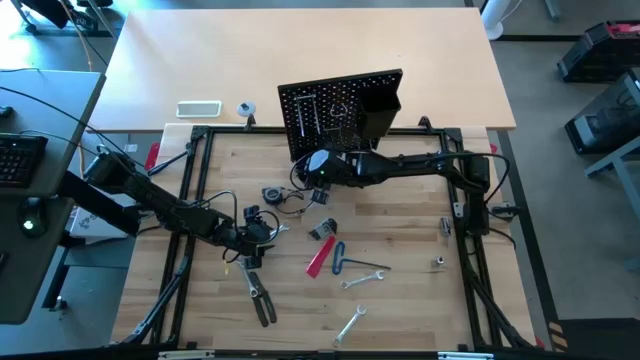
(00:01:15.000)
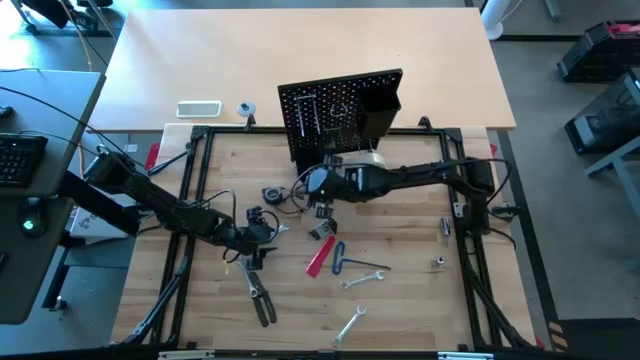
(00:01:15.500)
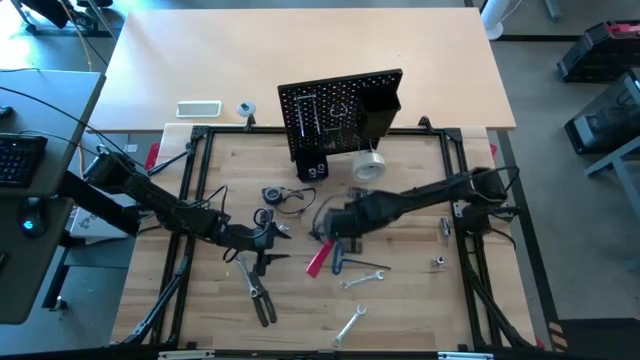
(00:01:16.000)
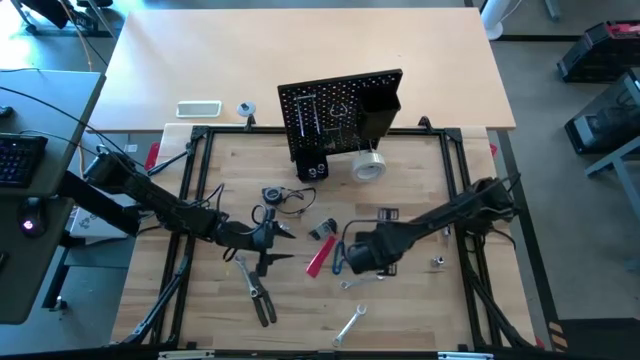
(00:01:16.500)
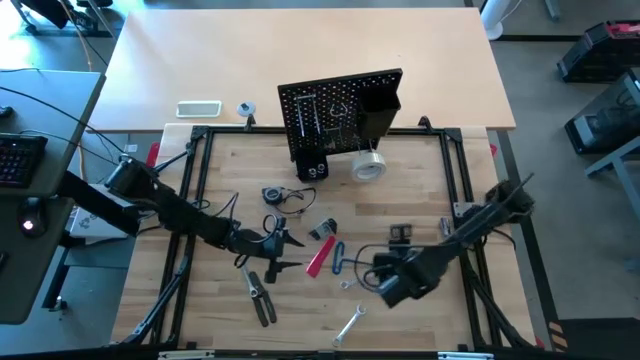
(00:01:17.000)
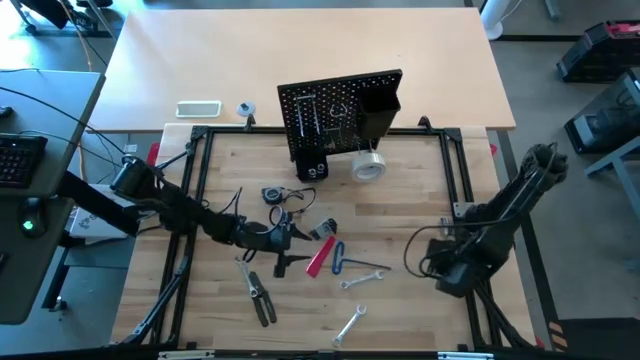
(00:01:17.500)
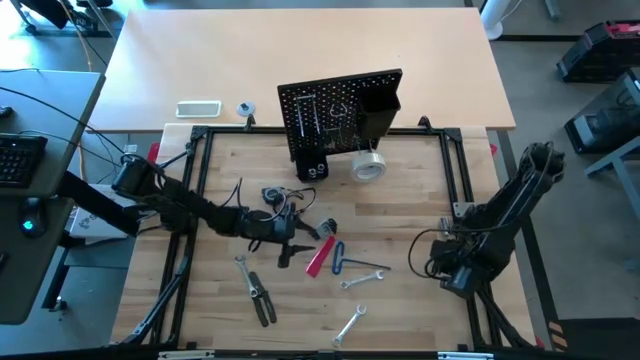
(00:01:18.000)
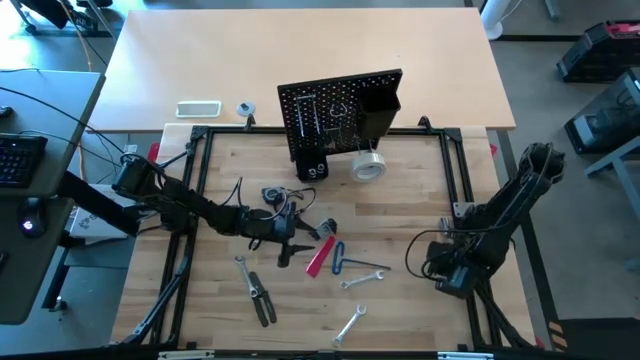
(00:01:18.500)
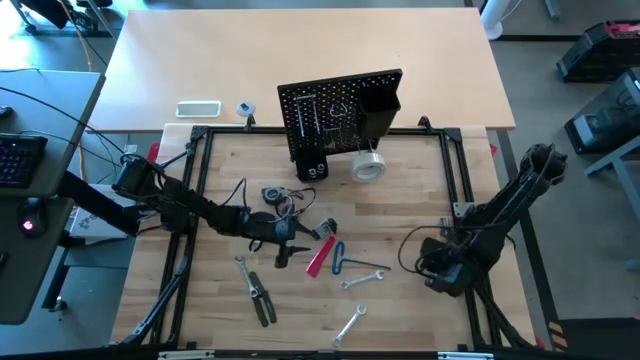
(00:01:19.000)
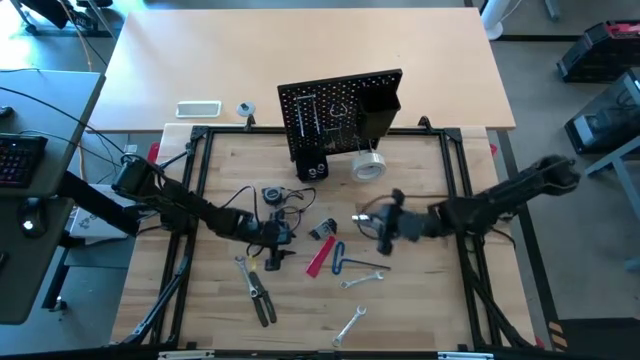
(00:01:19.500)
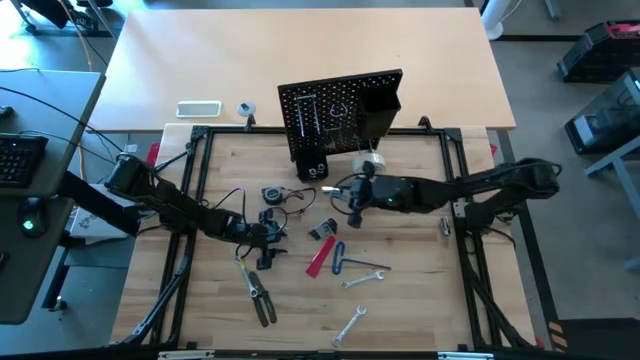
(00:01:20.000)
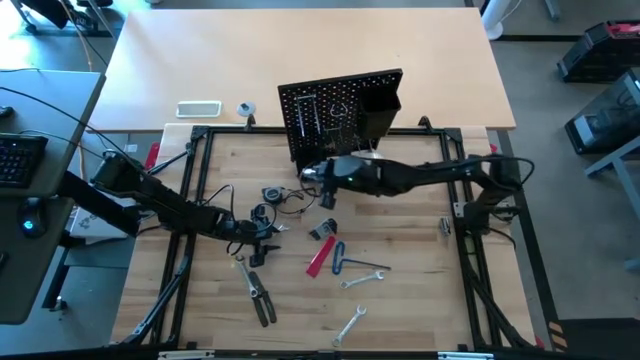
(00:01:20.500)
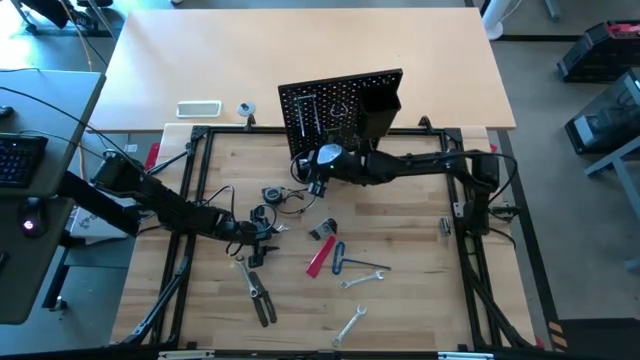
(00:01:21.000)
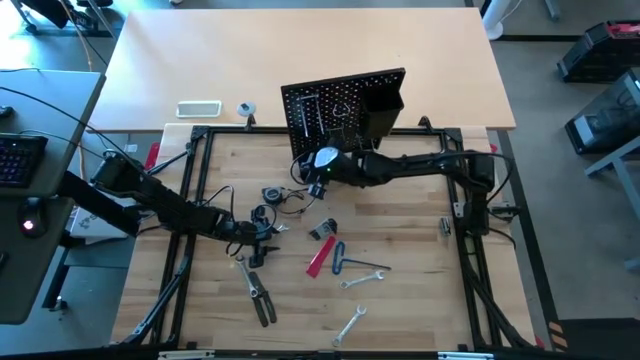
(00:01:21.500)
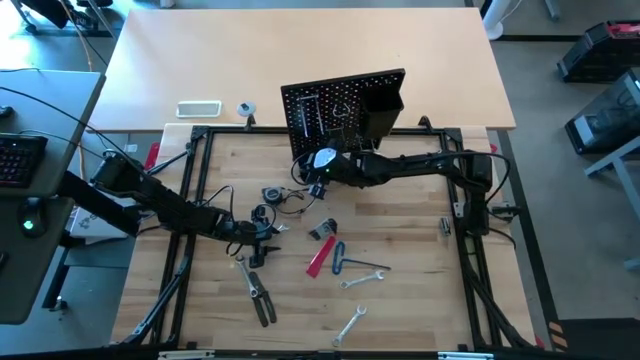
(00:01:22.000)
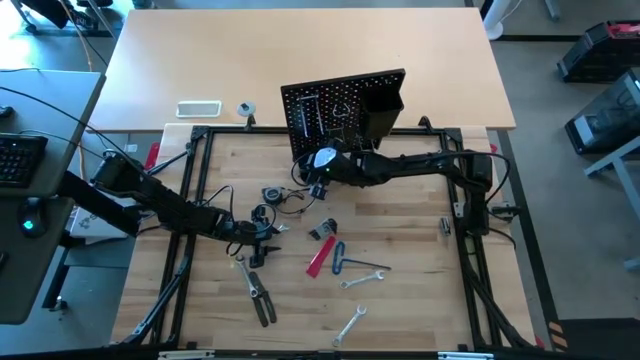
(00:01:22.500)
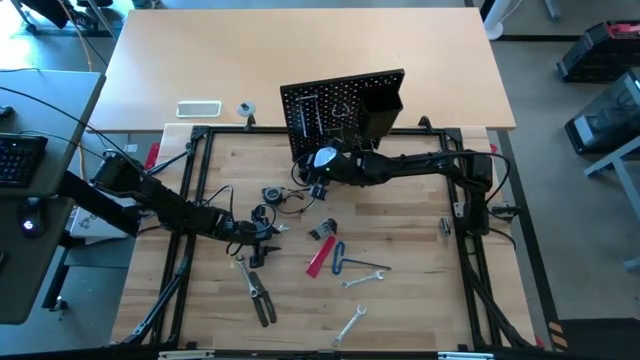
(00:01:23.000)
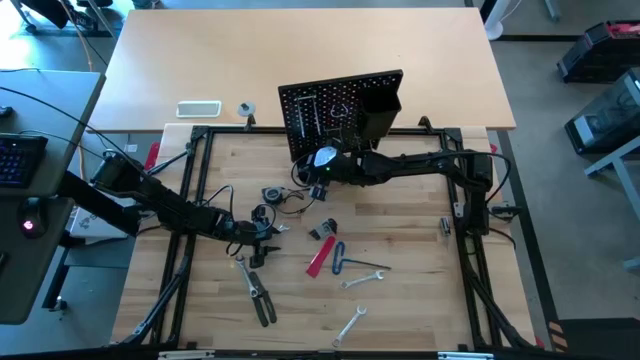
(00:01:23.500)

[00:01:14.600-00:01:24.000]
Task: Hang tools onto peg board
Put the bottom socket into the bottom black bin on the peg board

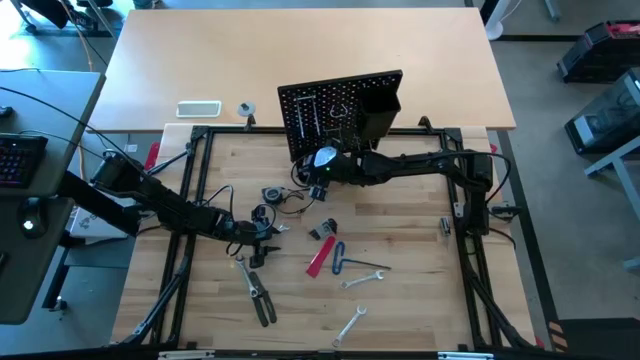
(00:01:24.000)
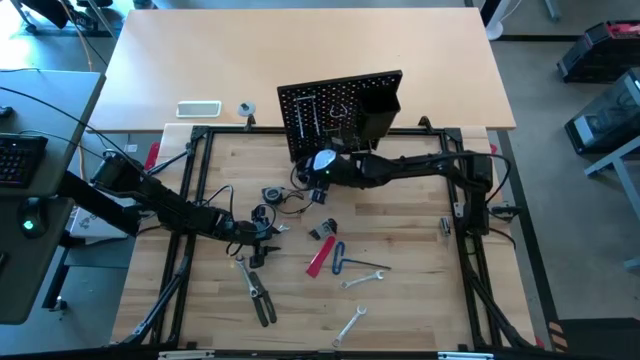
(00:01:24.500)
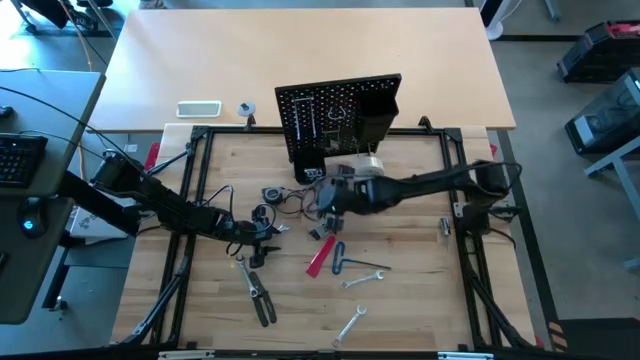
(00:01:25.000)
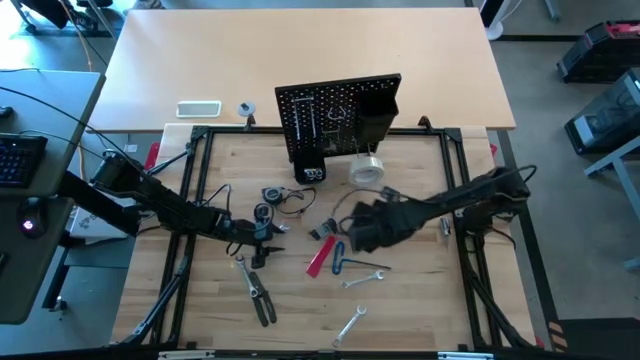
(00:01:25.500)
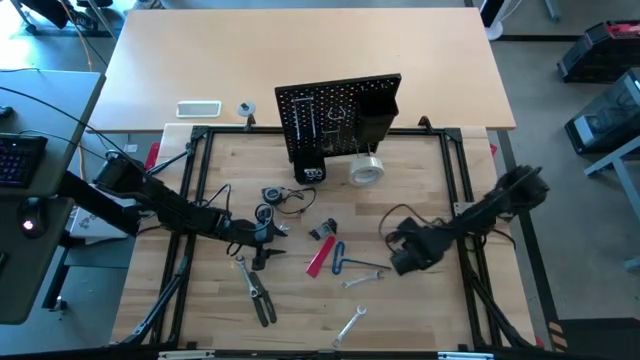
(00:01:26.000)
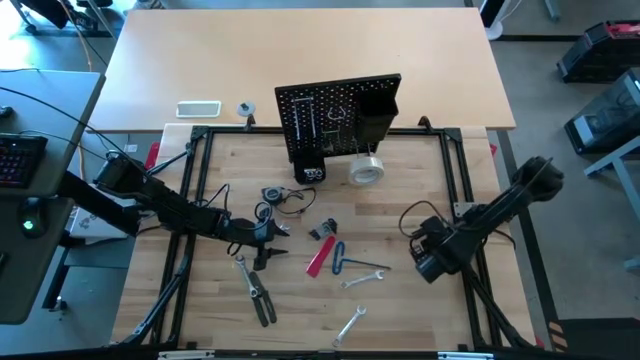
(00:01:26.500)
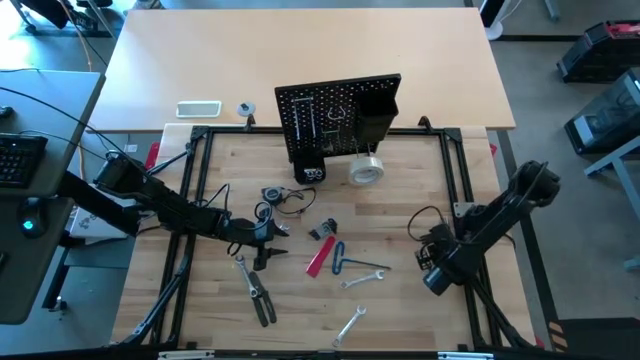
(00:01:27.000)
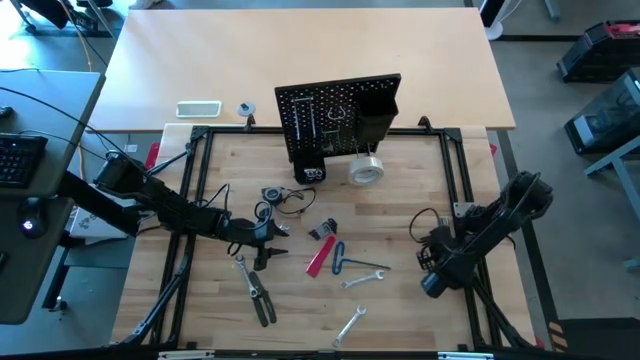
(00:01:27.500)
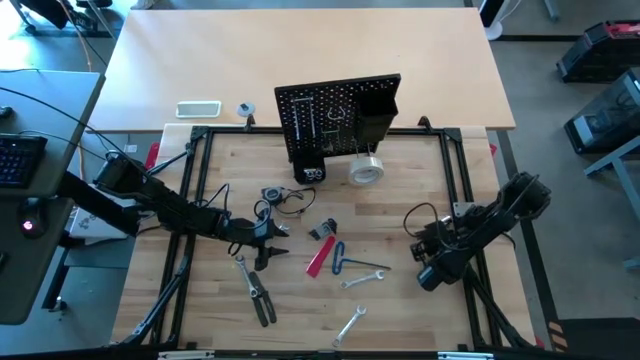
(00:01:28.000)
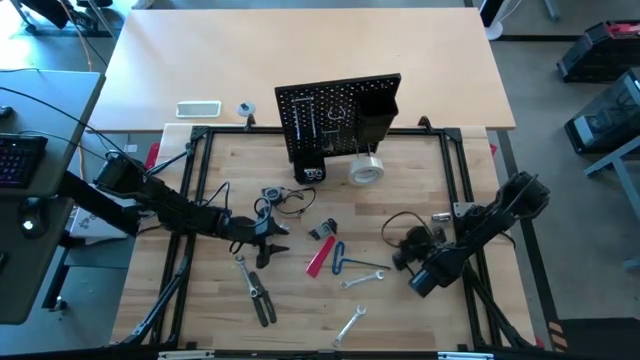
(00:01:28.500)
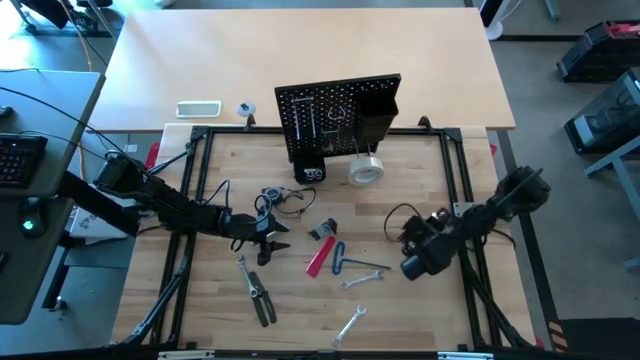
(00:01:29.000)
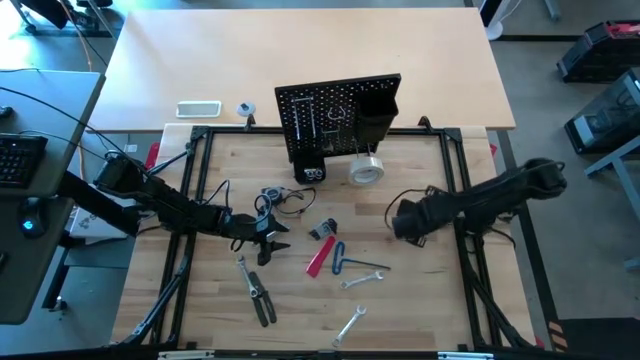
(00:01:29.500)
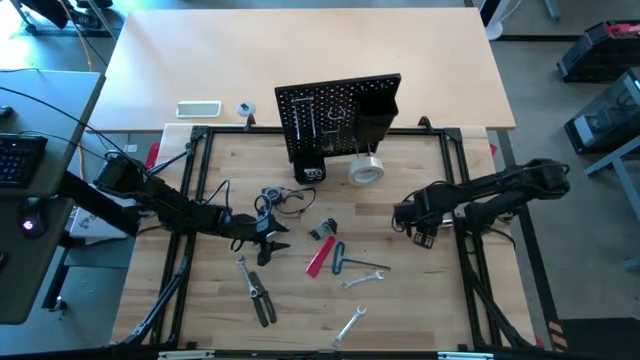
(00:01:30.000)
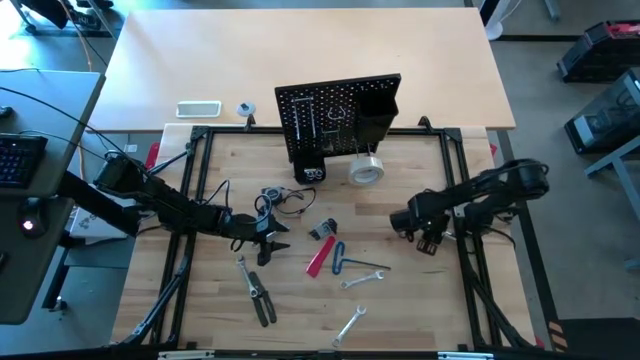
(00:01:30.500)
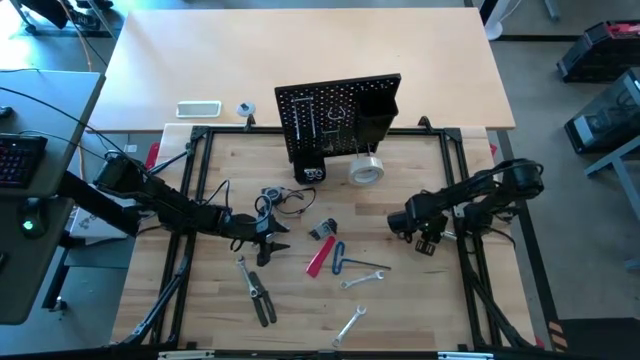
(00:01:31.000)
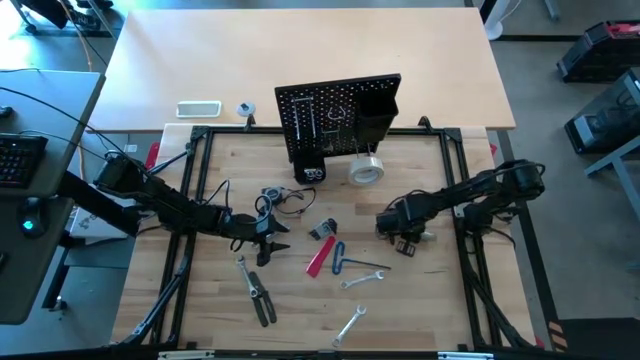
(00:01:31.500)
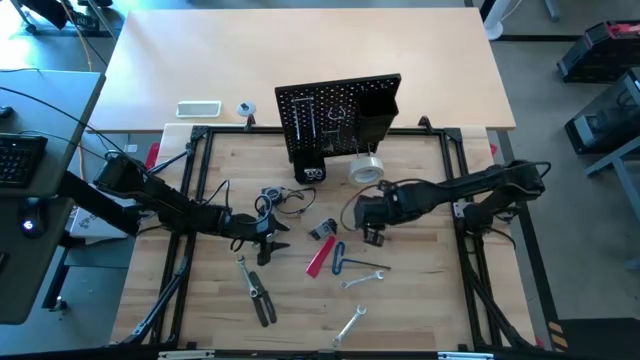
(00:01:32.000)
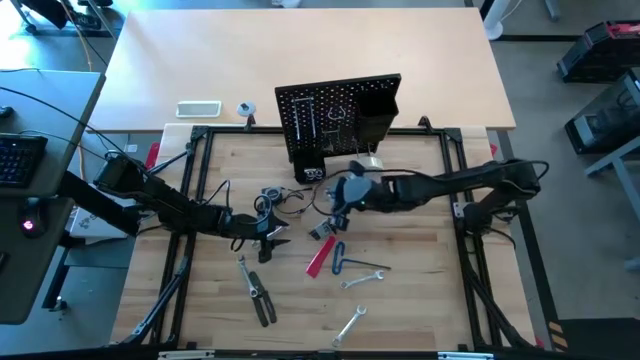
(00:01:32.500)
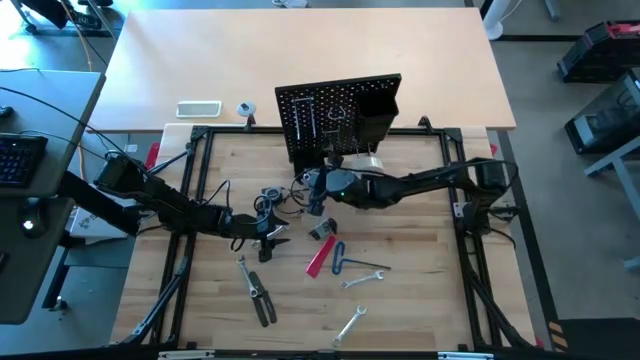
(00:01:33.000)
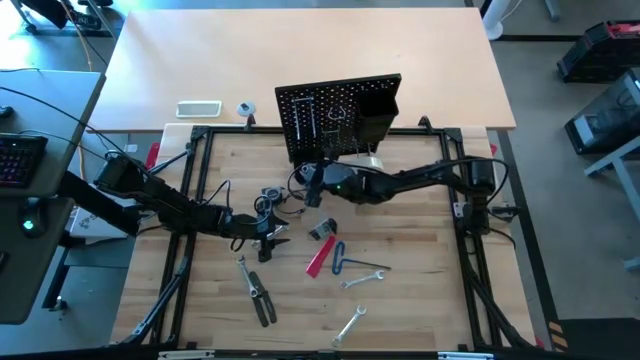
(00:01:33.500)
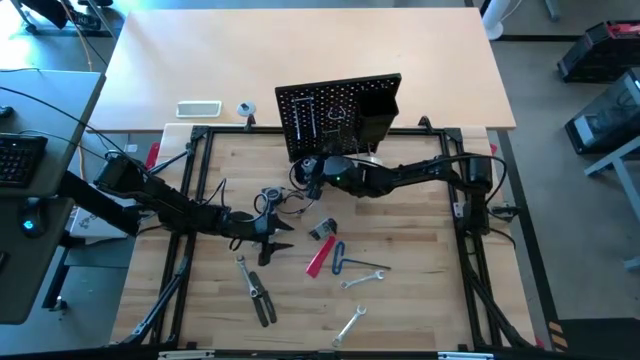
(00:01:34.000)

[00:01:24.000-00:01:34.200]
Put the socket into the bottom black bin on the peg board

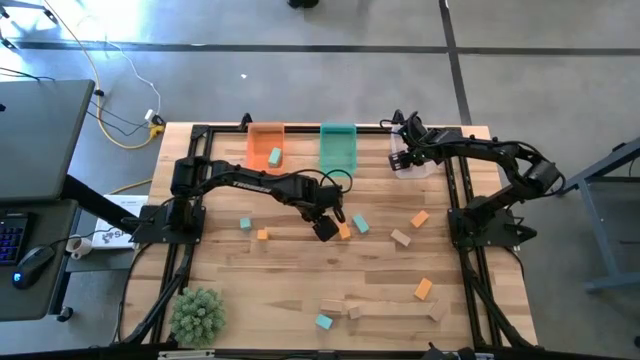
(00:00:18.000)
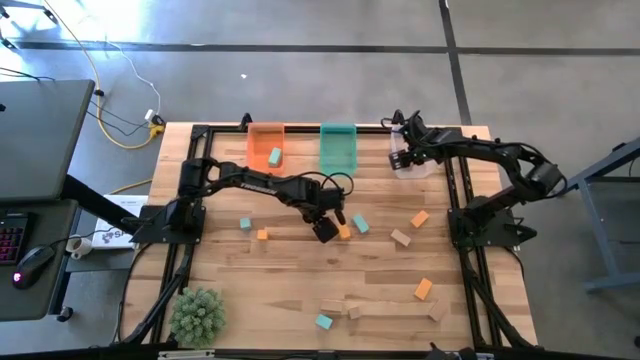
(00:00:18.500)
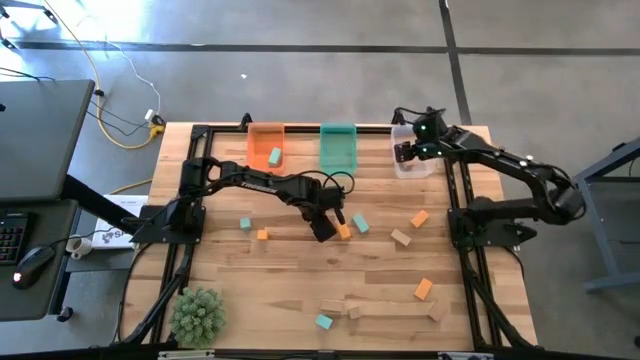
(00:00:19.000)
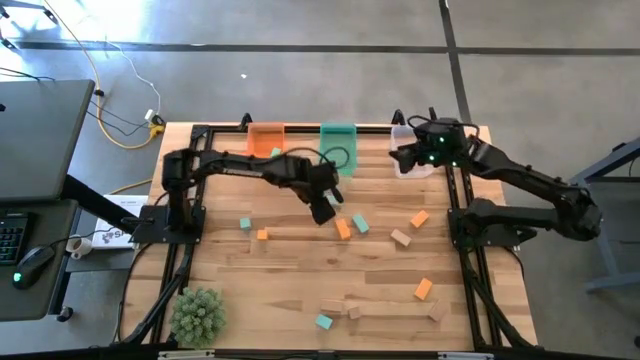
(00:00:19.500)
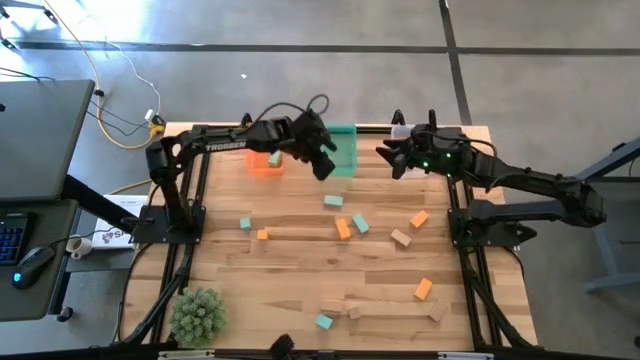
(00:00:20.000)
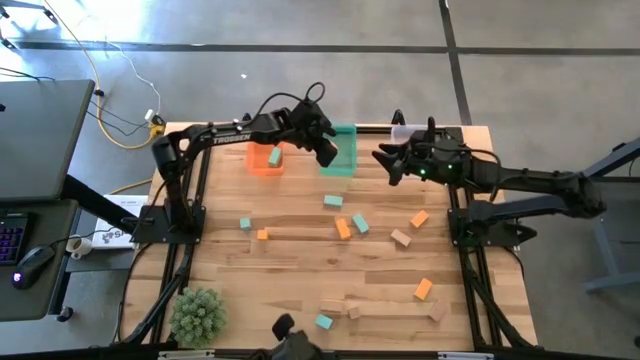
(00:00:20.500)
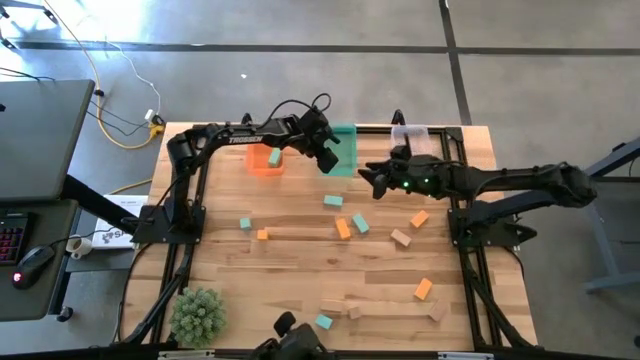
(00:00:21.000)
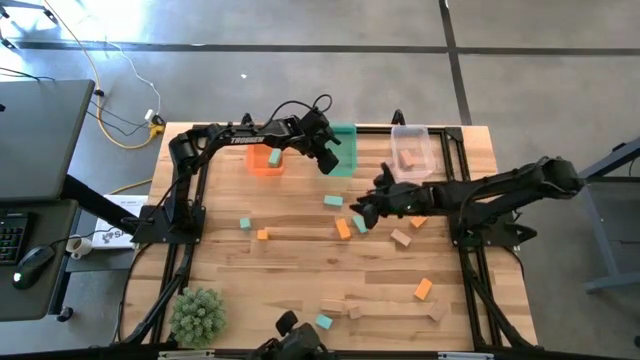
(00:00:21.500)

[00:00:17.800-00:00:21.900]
Task: Sort & place blocks by color
Put the yellow block into the blue bin
